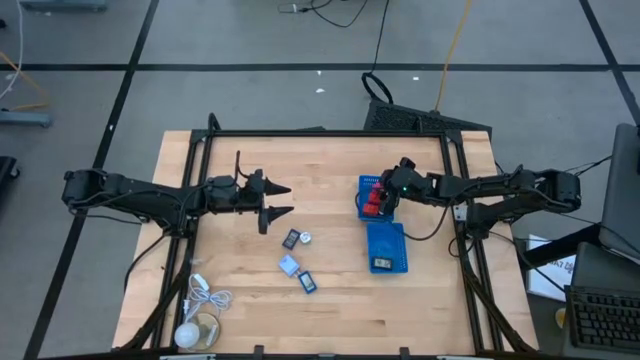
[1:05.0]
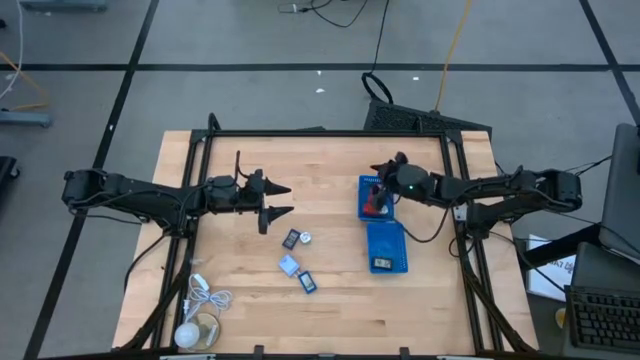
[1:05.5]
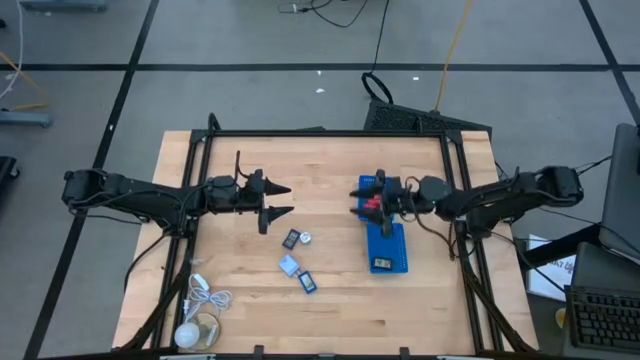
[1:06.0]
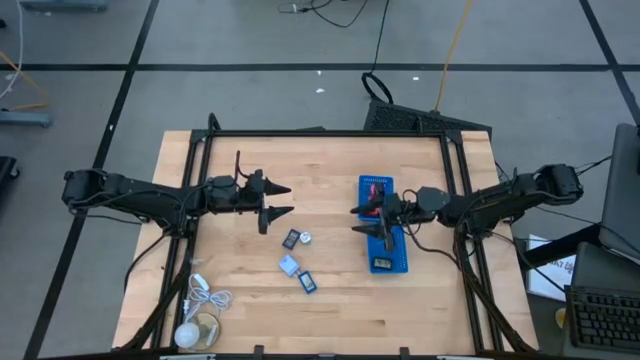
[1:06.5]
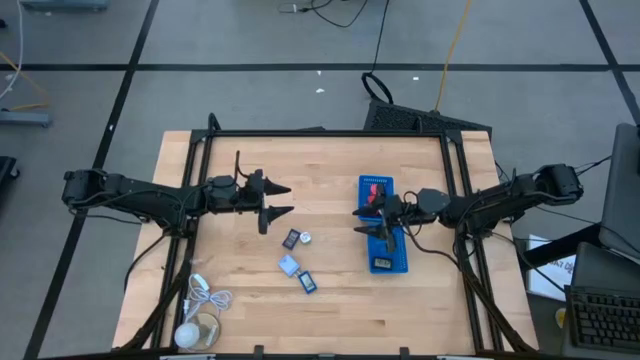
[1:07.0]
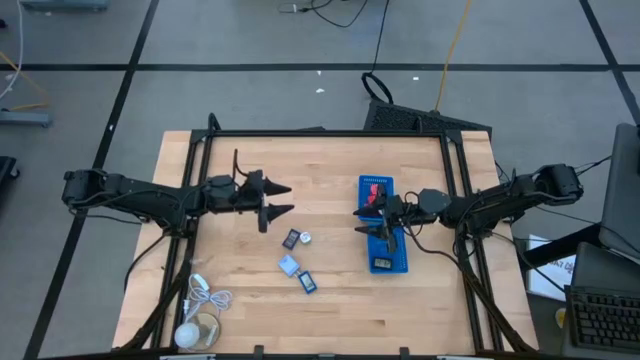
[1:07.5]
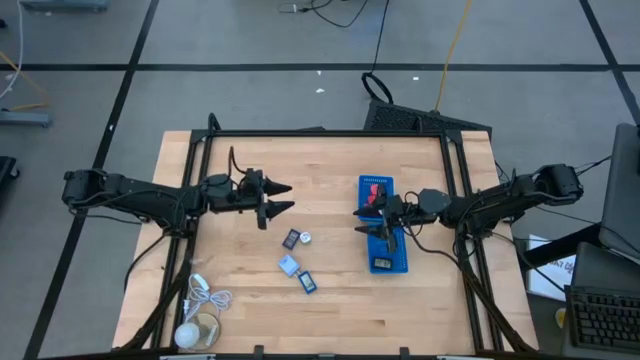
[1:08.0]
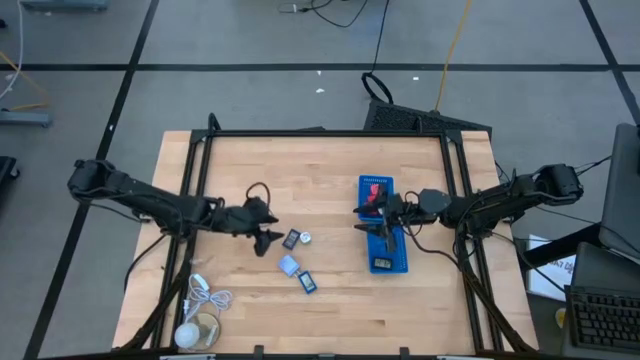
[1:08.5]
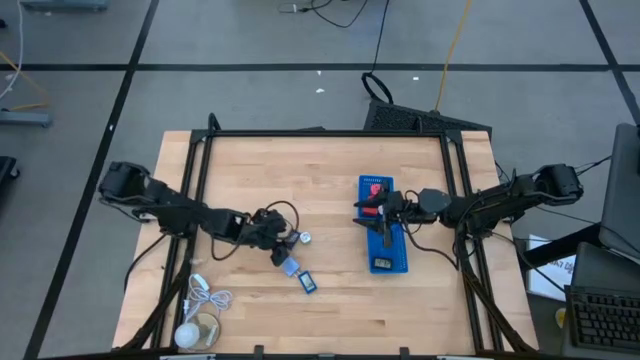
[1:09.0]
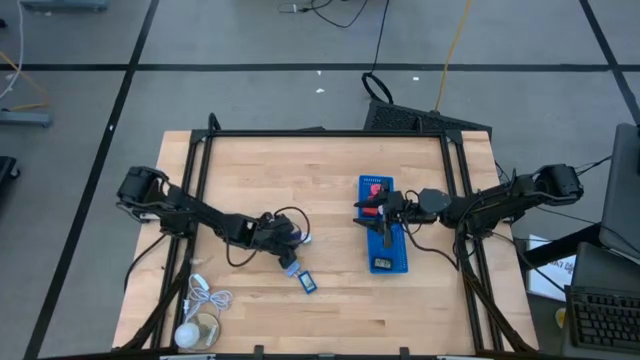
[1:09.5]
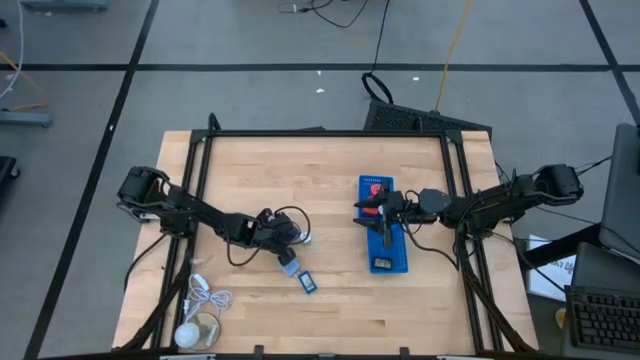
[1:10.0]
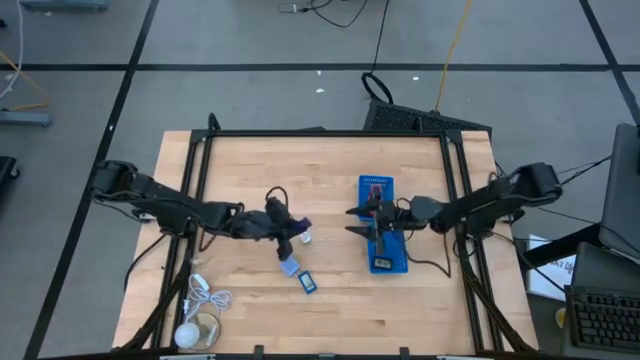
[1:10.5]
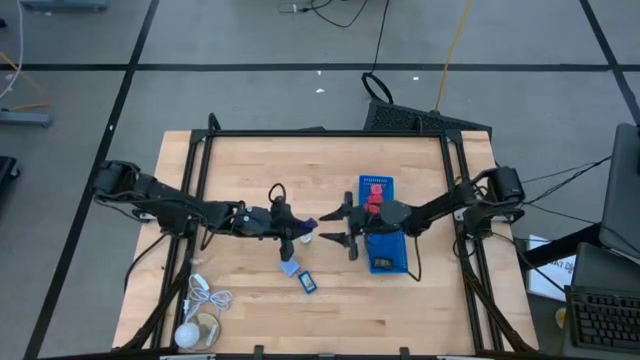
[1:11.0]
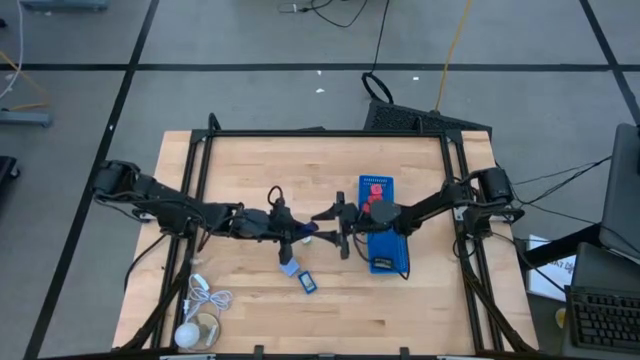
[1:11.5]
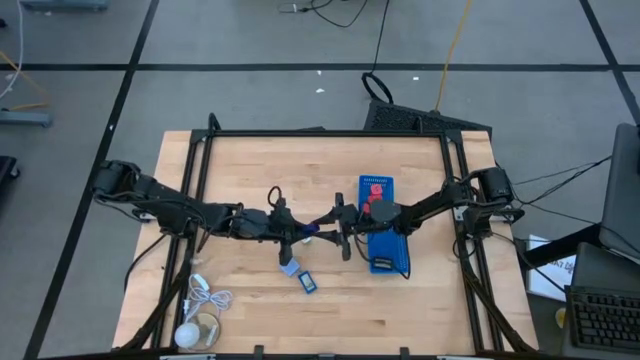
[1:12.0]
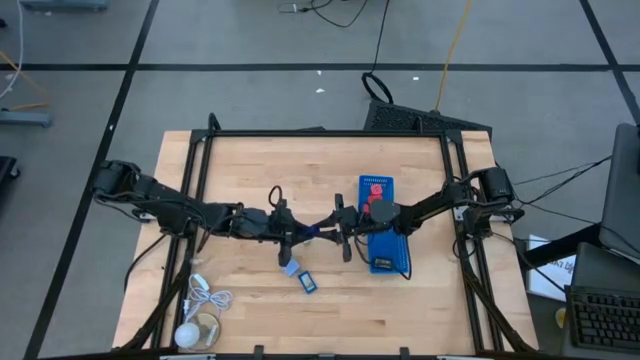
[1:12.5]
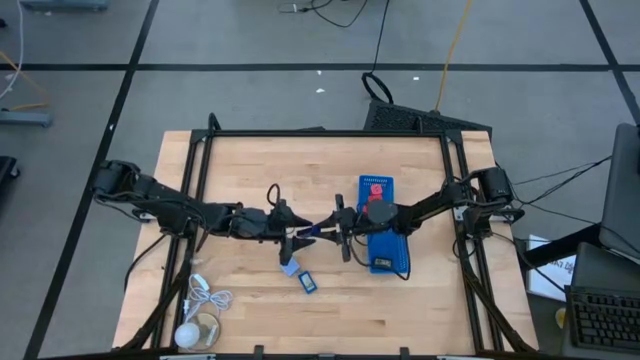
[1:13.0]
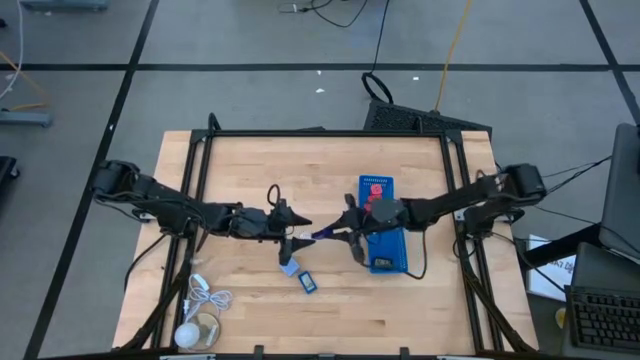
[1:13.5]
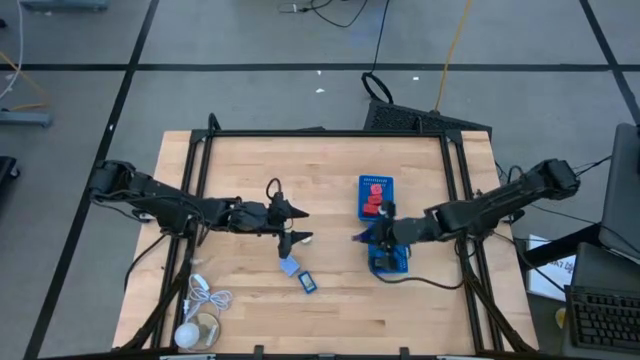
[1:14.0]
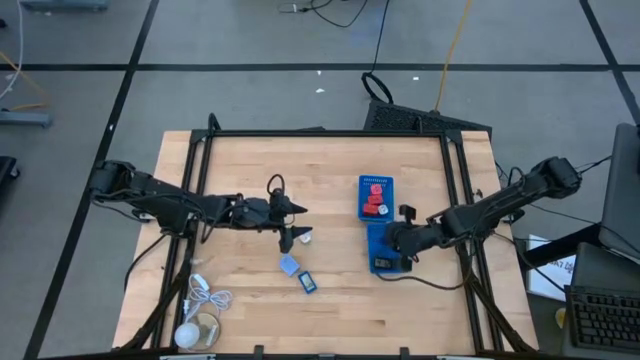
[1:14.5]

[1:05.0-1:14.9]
Task: Pick & Place Office items
Put the top blue digital timer into the bottom blue bin

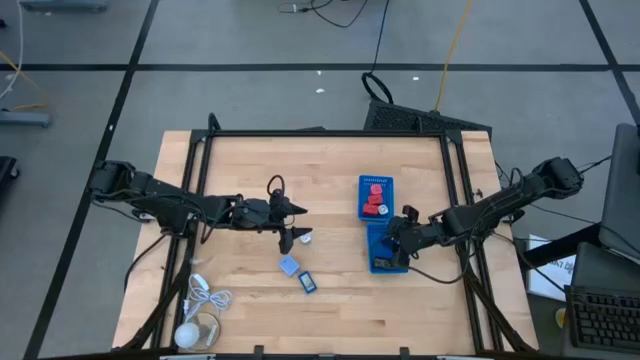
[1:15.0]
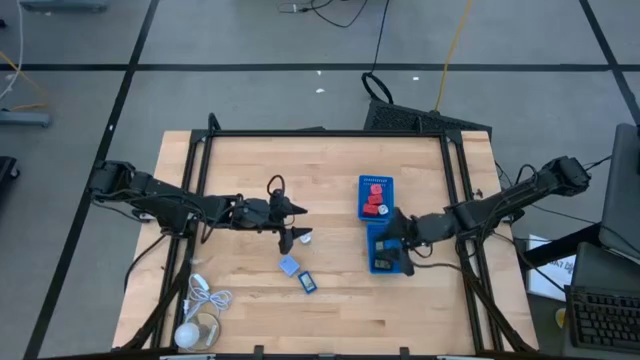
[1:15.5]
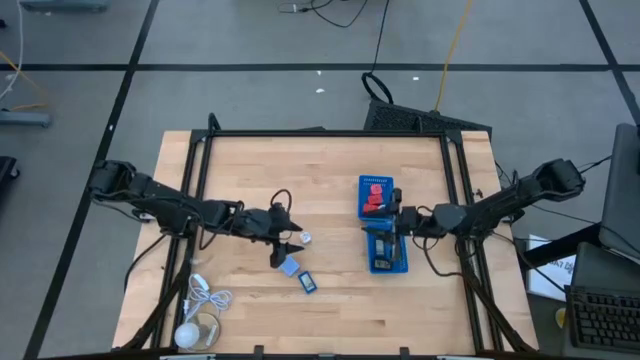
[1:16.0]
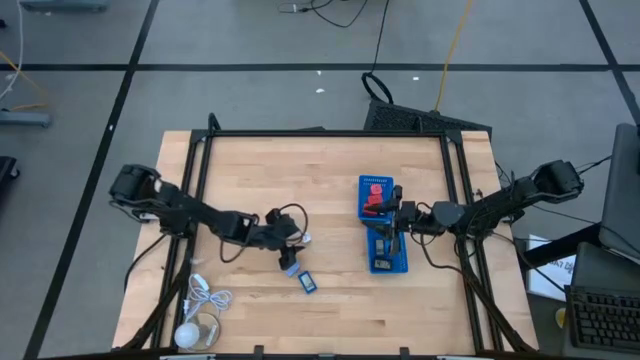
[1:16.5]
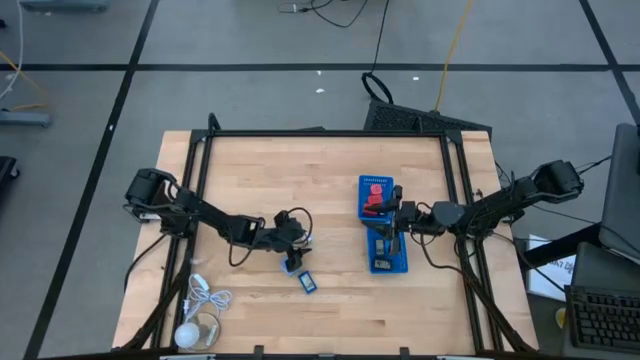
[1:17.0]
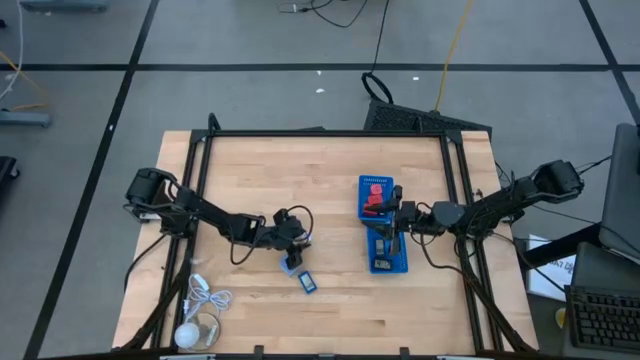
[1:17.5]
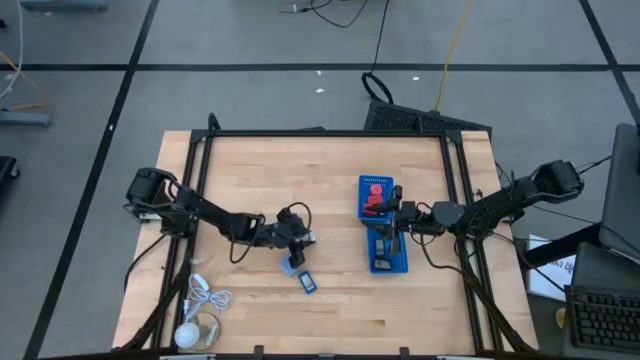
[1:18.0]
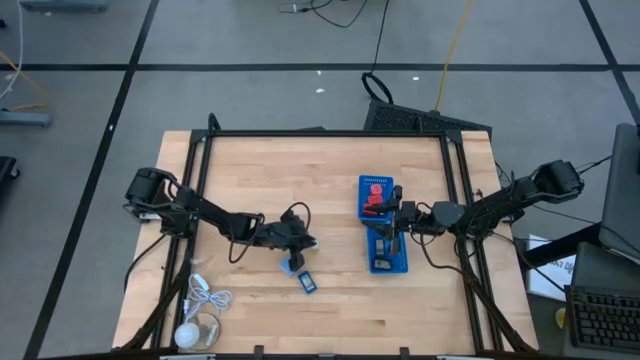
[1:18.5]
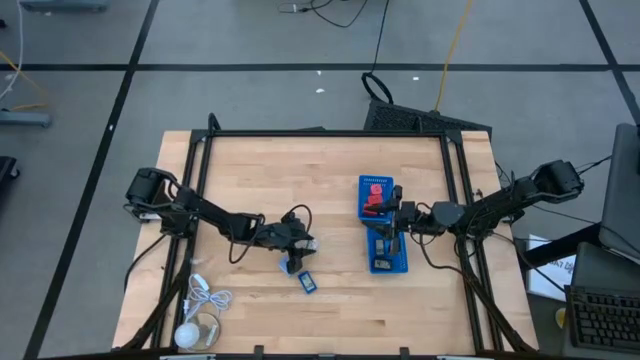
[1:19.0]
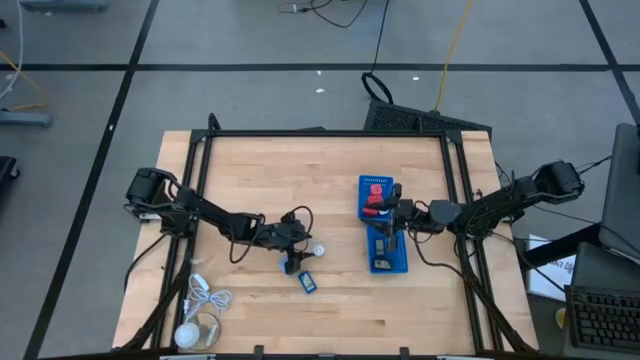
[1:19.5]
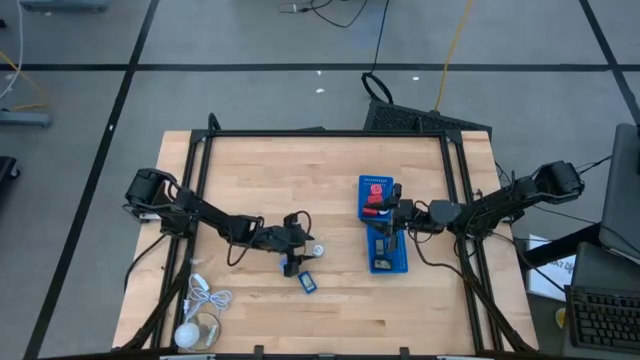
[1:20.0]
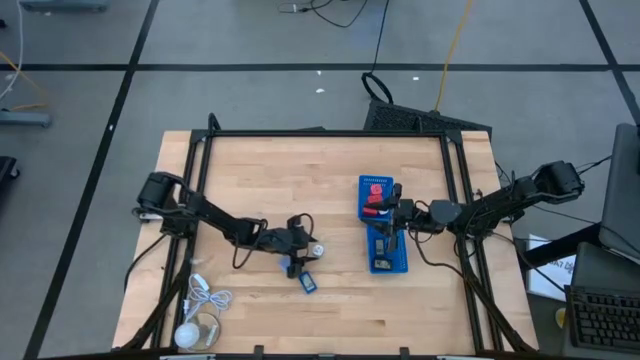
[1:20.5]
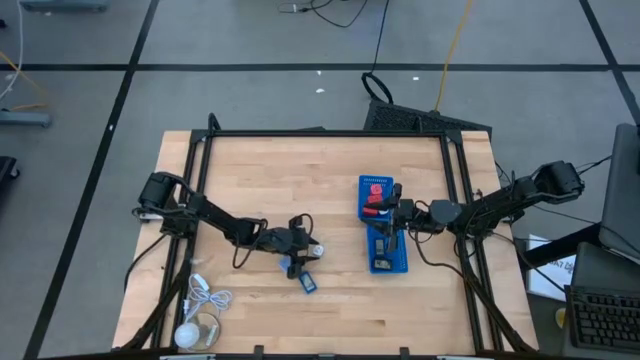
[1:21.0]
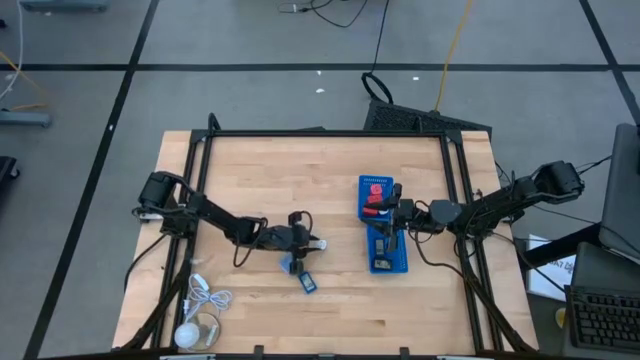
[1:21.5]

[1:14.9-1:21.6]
Put the green charger adapter into the top blue bin

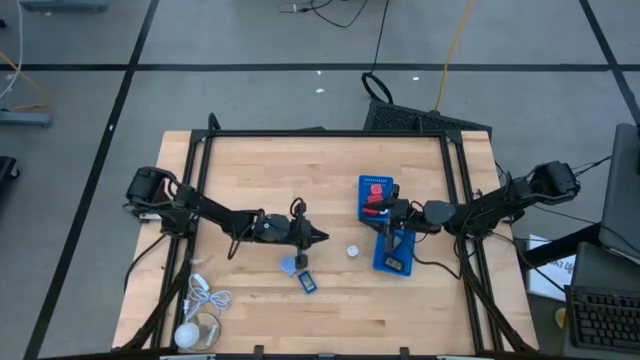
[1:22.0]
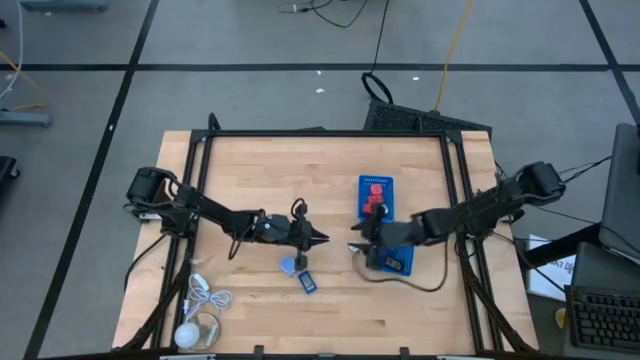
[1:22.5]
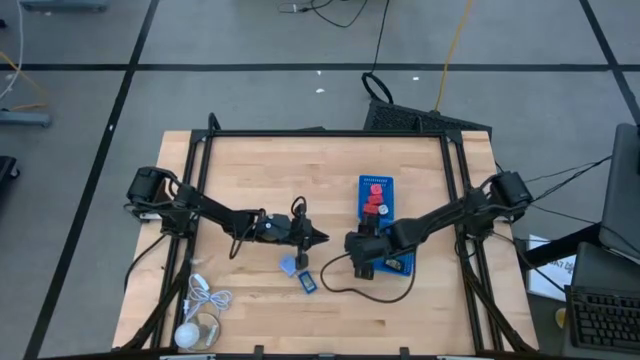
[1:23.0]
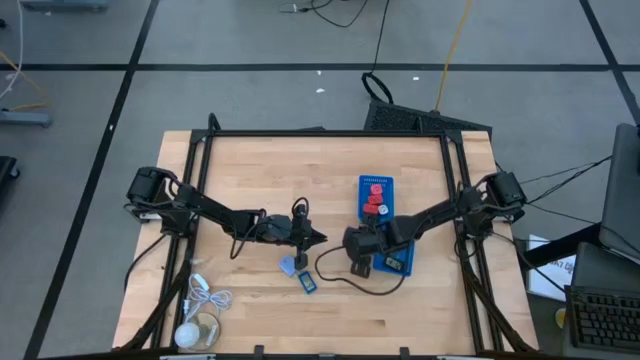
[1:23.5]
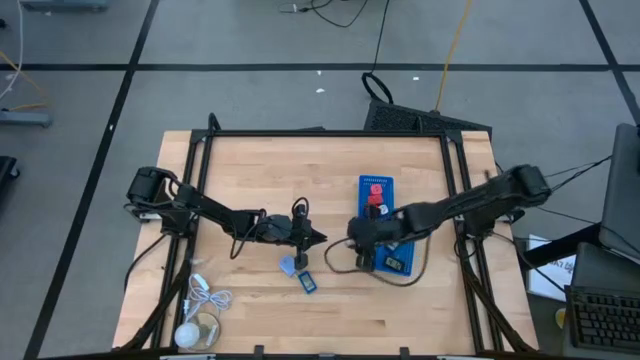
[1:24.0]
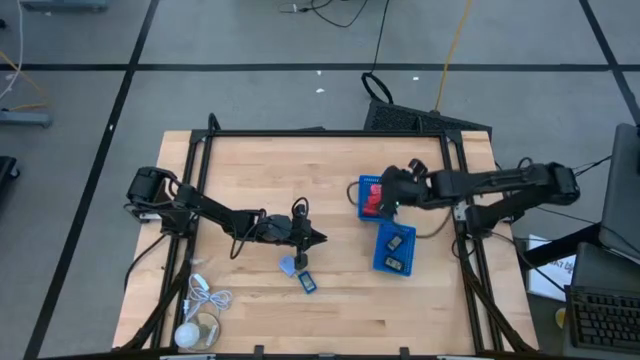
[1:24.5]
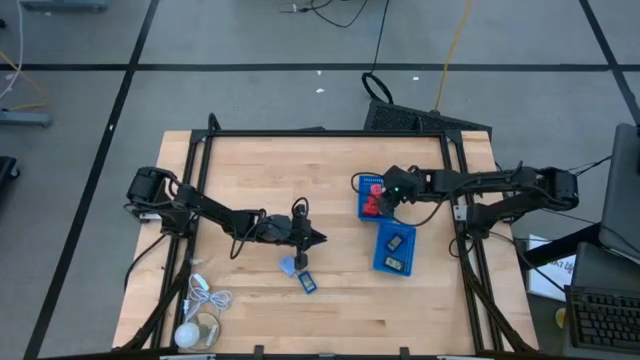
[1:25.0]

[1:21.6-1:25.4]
Put the green charger adapter into the top blue bin

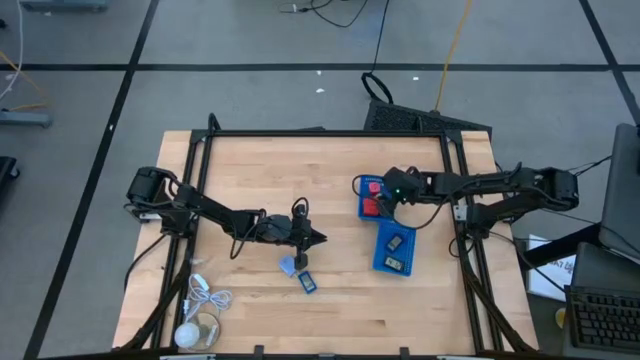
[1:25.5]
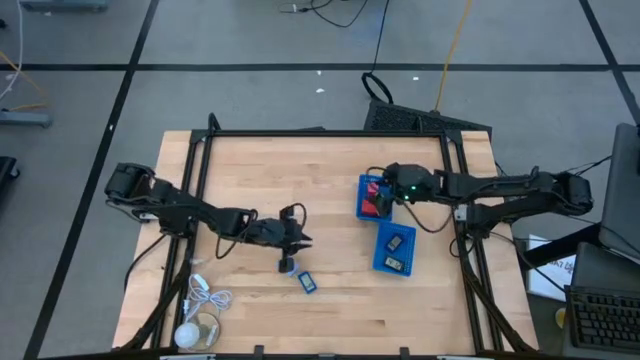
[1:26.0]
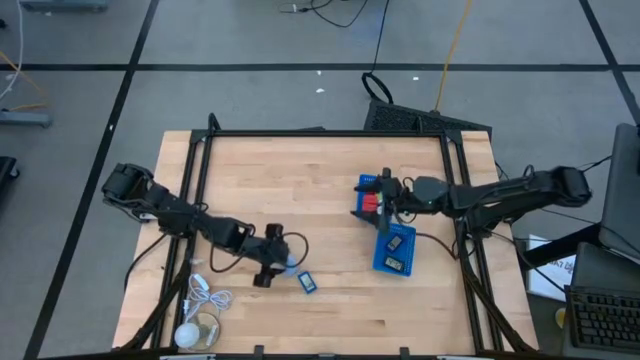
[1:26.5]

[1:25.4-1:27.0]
Put the light blue charger adapter into the top blue bin
